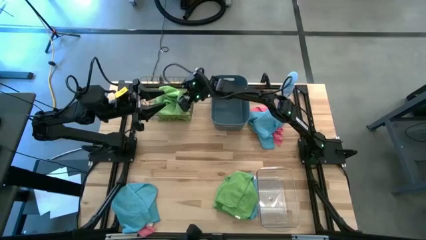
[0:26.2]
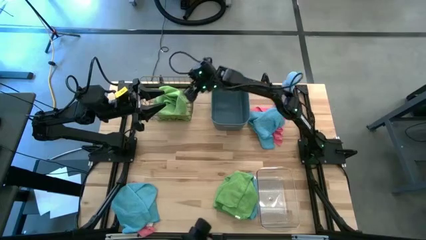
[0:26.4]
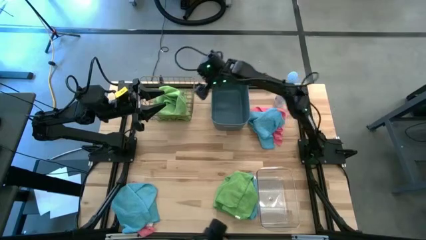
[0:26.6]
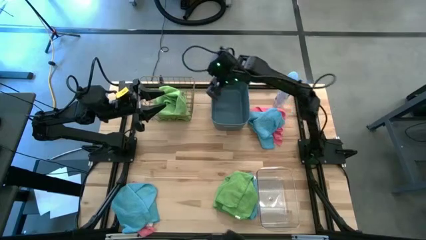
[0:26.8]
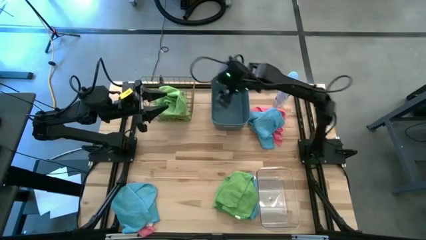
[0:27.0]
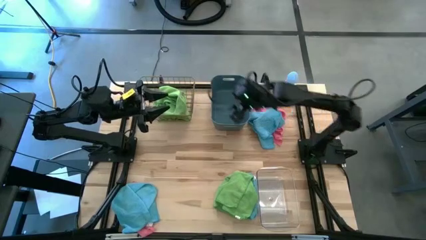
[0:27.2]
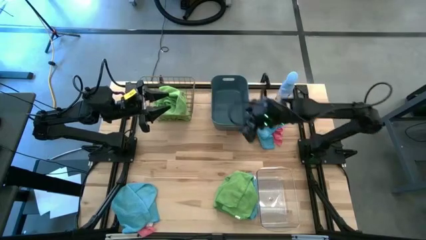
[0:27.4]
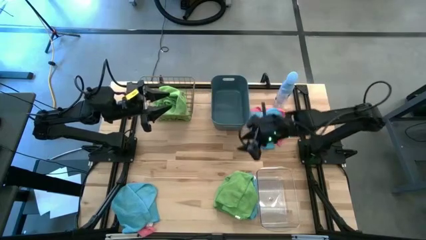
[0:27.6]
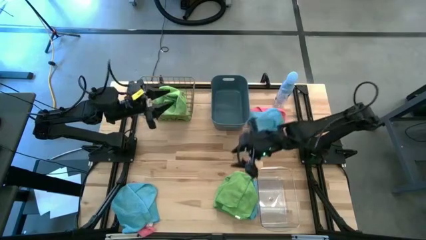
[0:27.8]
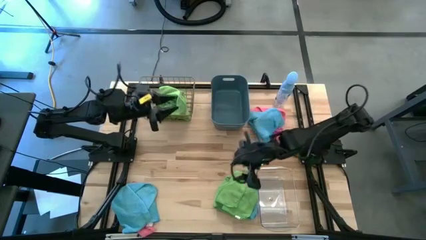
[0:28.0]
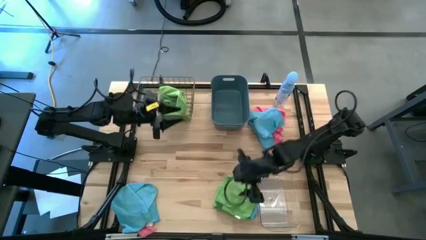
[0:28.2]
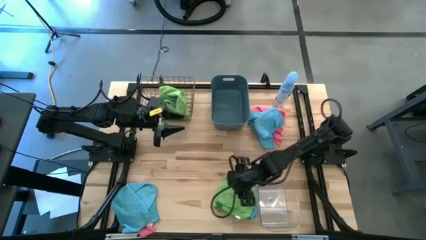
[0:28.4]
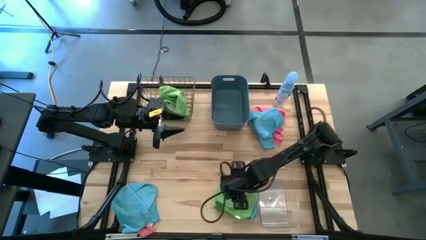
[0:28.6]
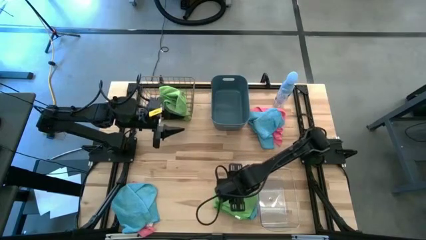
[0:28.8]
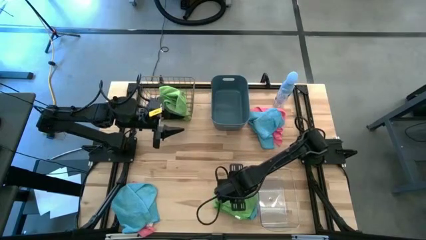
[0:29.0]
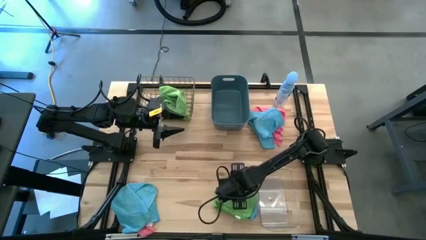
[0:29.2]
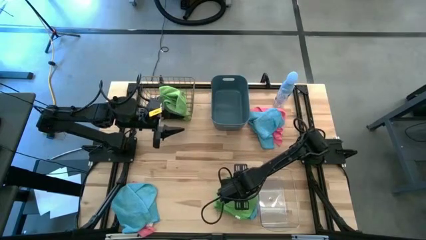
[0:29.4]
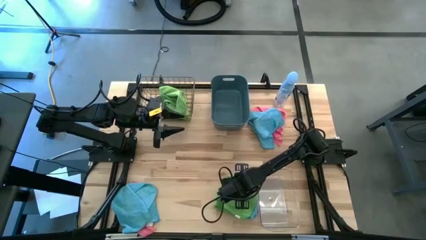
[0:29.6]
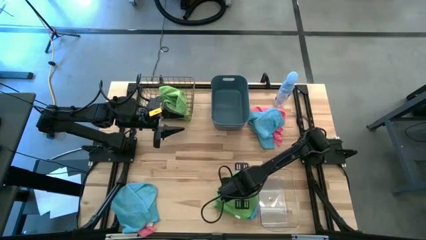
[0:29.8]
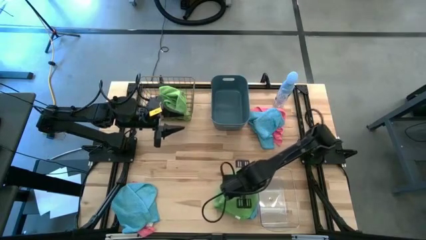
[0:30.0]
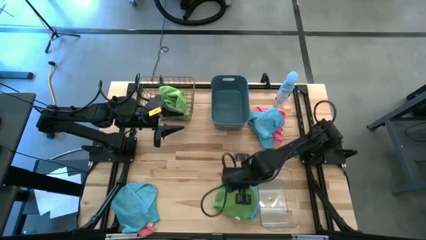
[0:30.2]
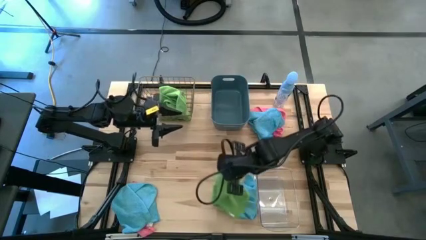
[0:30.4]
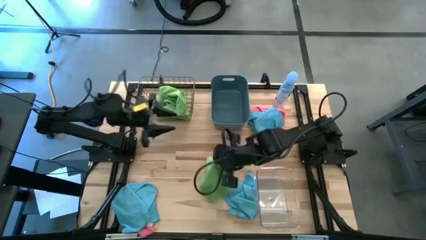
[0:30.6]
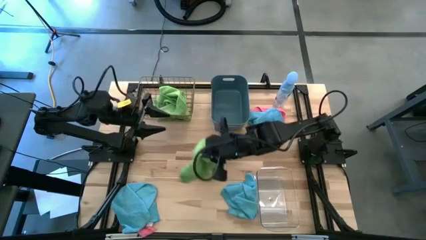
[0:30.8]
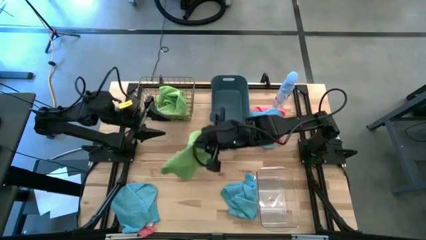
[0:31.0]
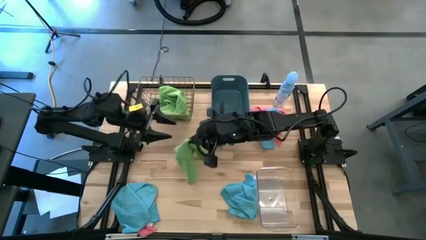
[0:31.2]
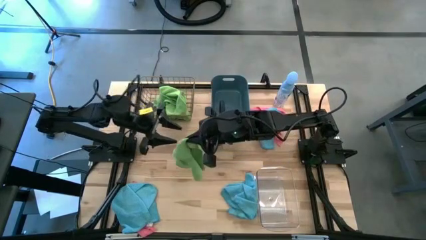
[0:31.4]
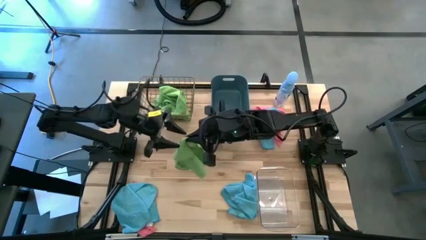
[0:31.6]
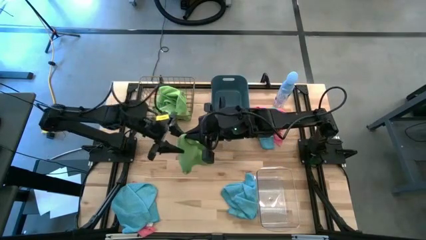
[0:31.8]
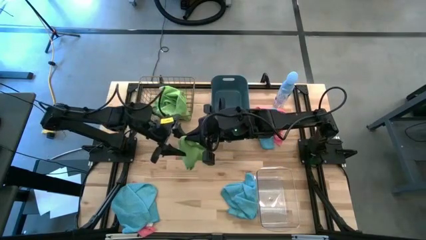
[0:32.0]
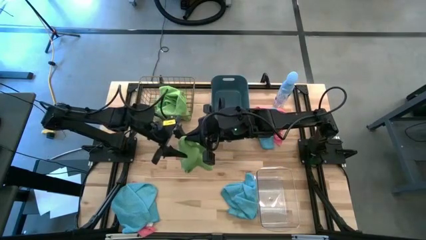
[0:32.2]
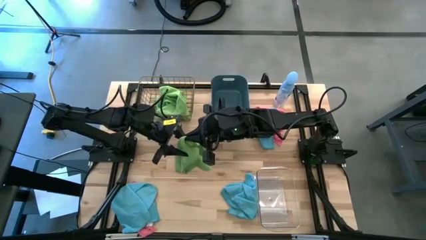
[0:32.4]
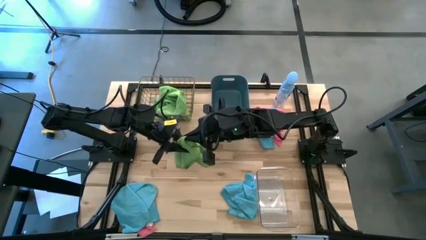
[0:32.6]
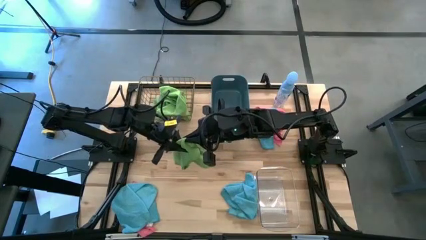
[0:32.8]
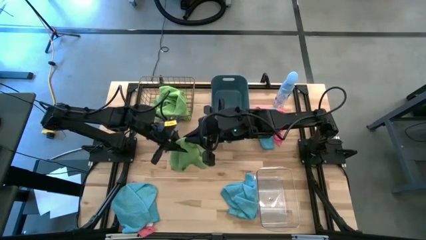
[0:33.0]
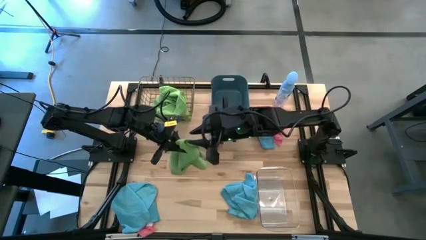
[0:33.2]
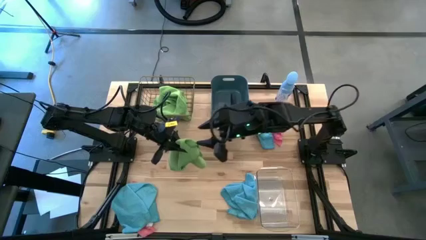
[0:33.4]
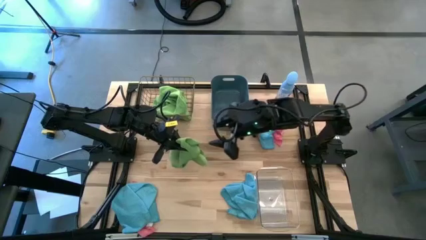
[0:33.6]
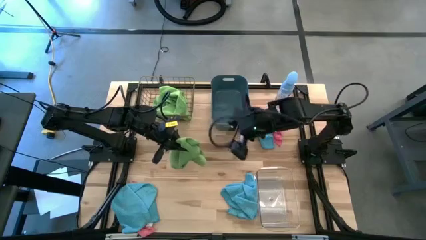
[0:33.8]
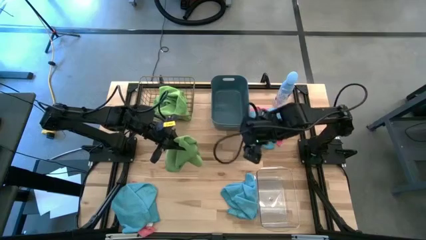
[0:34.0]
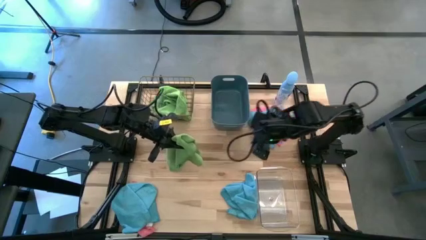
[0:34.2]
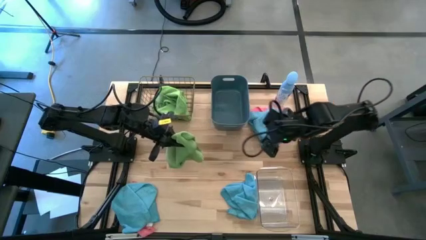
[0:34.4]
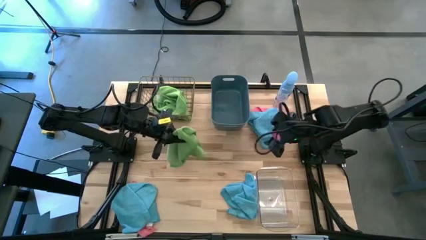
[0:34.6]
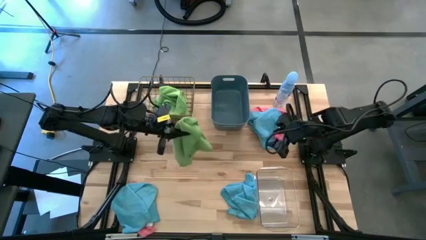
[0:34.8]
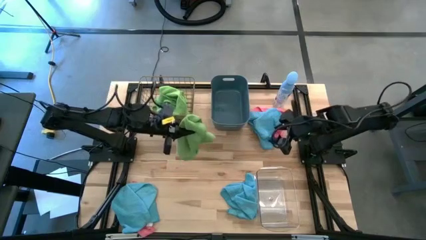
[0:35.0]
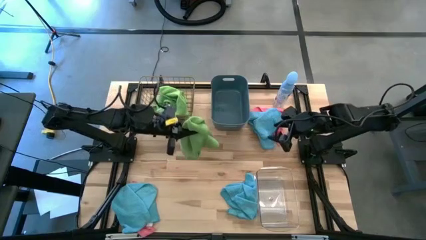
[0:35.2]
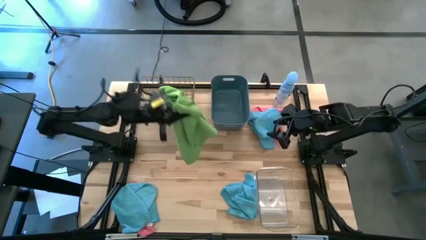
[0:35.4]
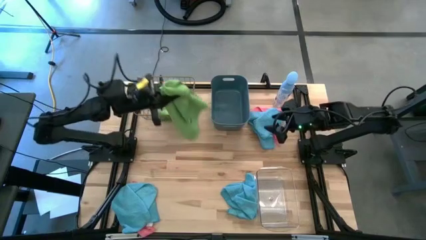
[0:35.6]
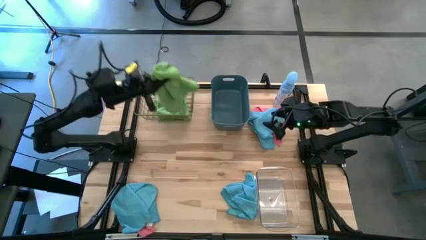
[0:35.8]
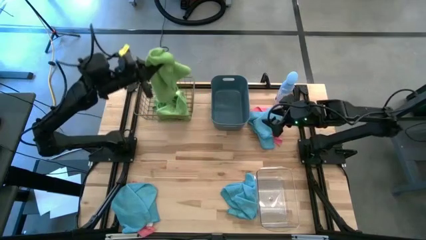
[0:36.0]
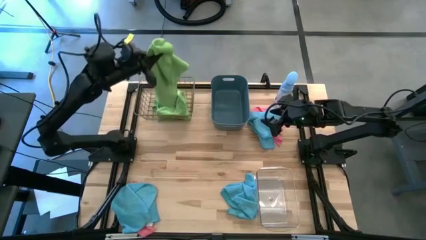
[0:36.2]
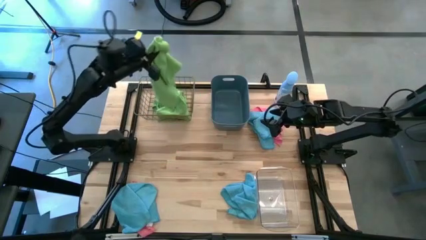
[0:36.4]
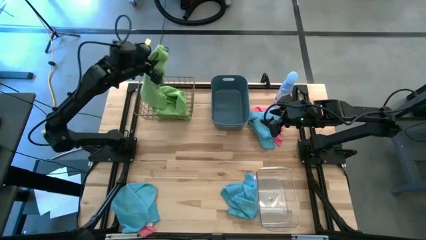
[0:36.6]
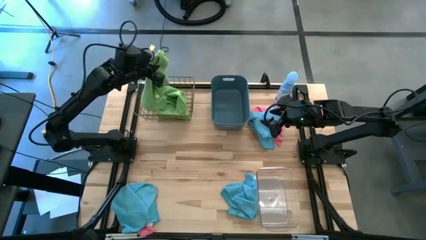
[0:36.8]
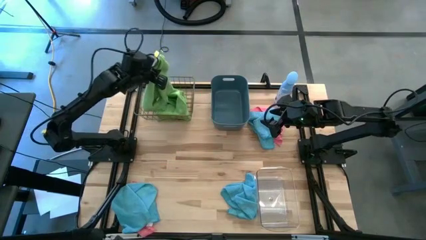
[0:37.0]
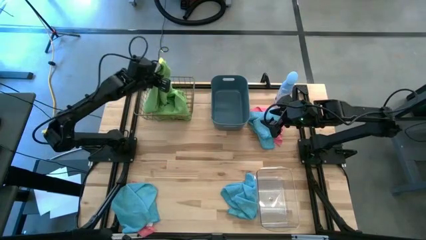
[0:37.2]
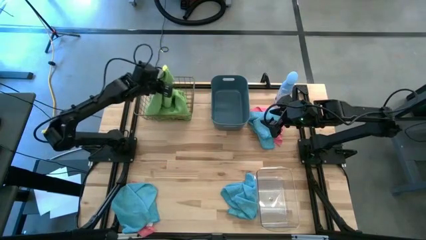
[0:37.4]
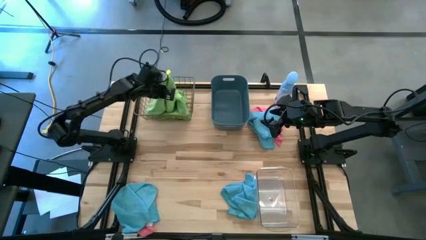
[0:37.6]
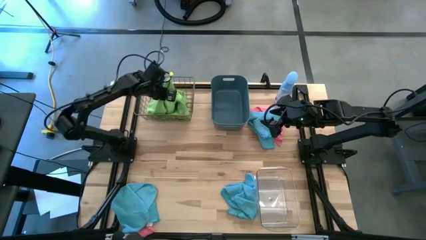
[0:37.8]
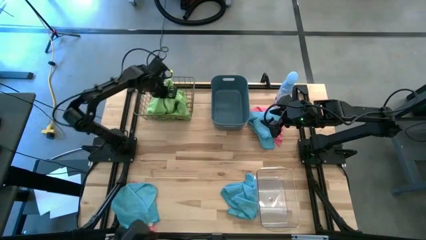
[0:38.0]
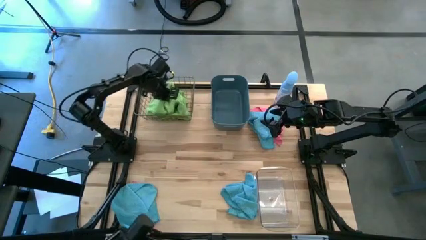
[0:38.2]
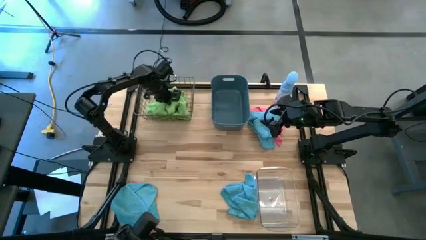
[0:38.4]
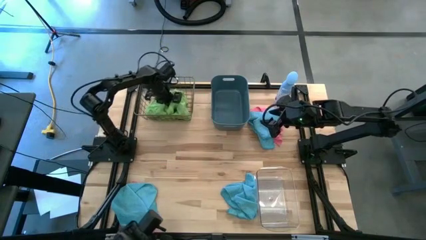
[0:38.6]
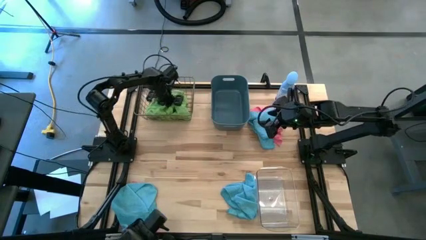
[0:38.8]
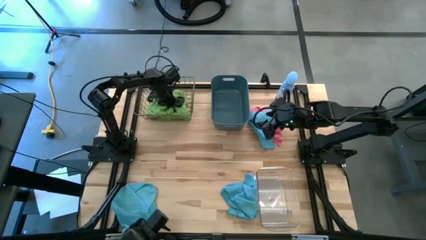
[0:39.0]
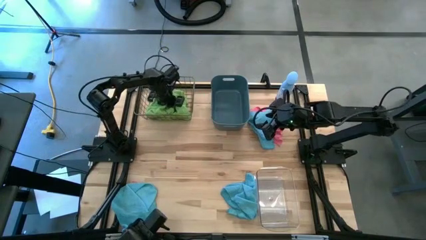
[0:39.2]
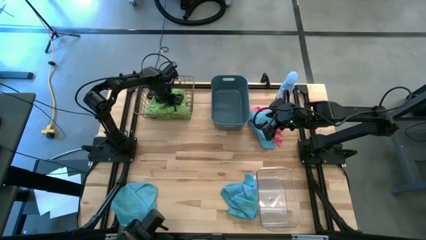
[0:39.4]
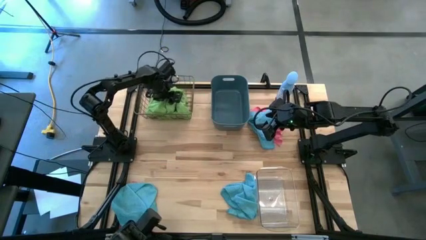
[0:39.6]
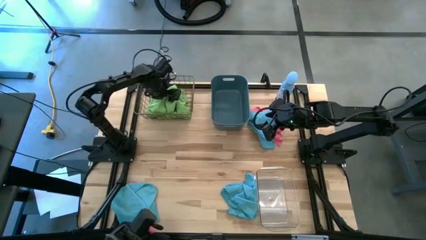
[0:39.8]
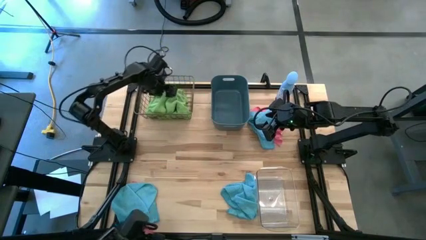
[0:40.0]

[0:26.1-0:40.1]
Task: Sort microfiber towel by color & place in baskets
Put the green towel into the wire basket

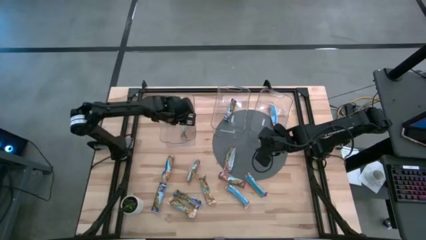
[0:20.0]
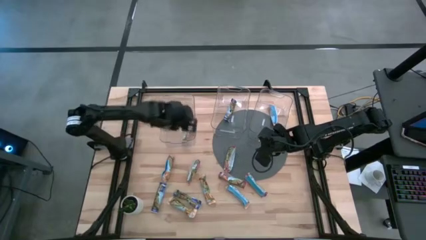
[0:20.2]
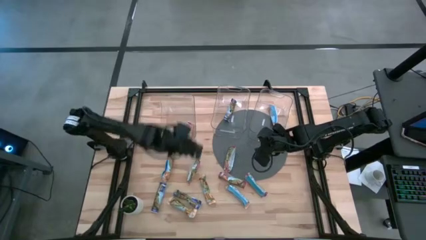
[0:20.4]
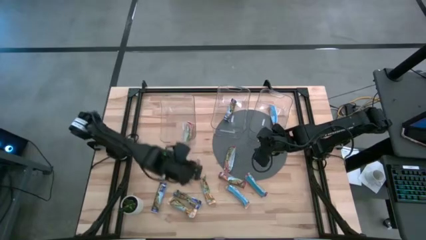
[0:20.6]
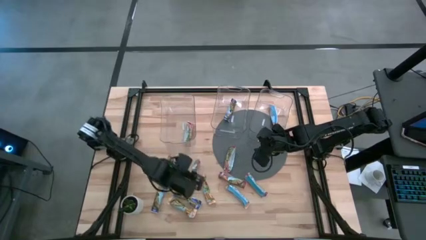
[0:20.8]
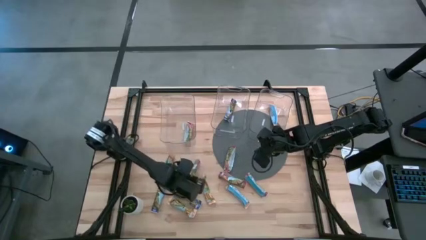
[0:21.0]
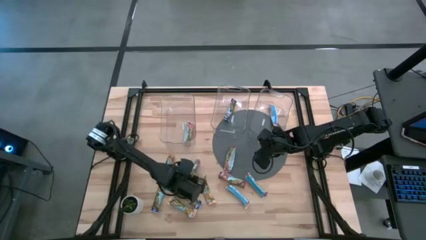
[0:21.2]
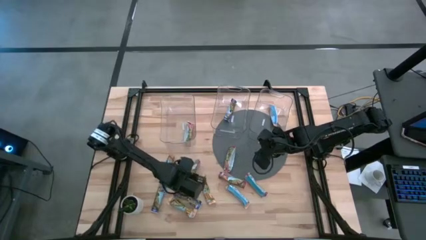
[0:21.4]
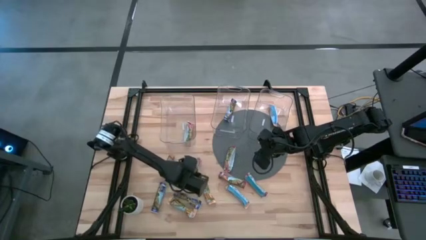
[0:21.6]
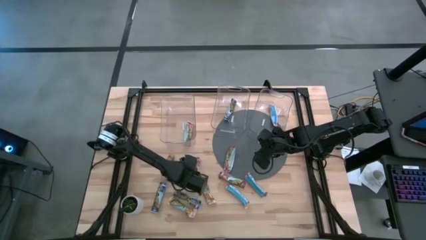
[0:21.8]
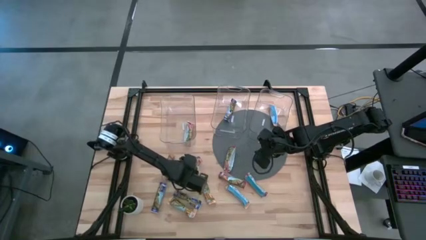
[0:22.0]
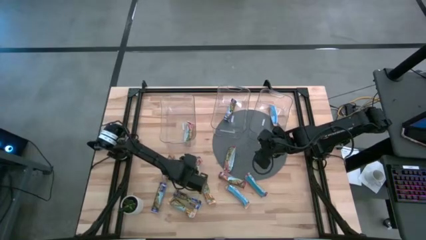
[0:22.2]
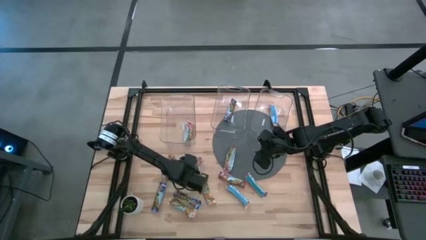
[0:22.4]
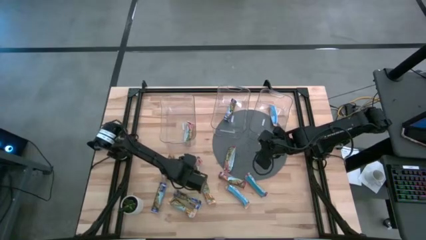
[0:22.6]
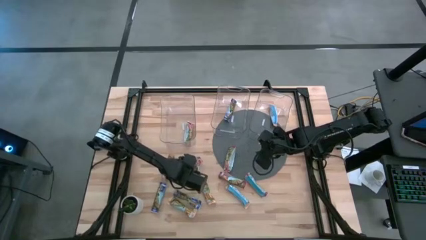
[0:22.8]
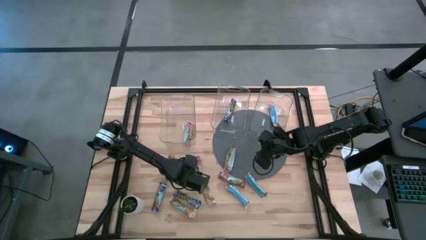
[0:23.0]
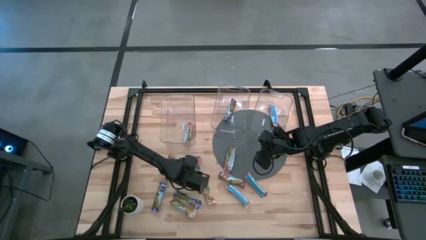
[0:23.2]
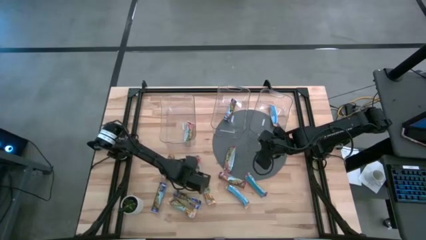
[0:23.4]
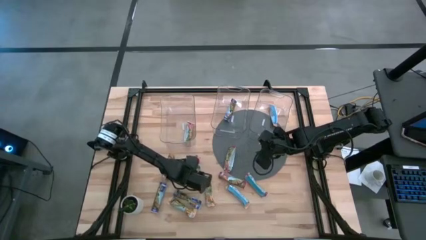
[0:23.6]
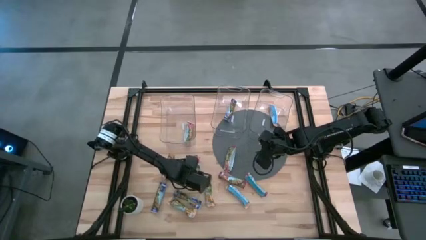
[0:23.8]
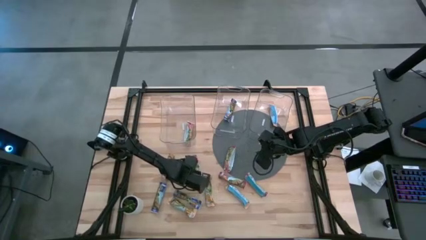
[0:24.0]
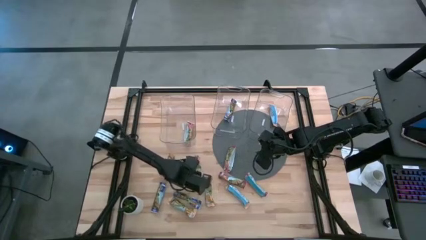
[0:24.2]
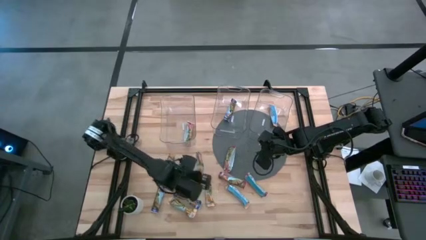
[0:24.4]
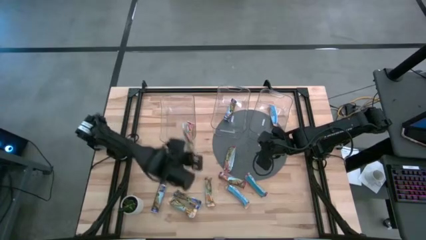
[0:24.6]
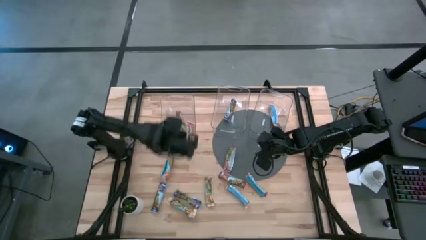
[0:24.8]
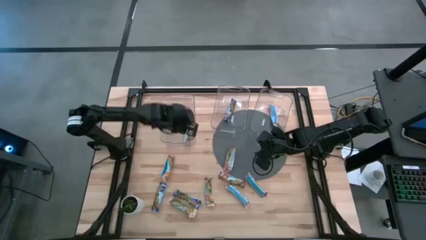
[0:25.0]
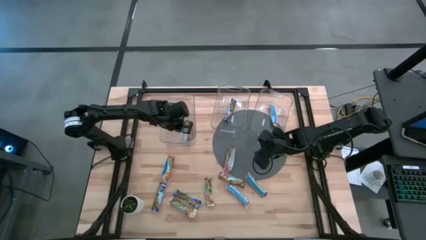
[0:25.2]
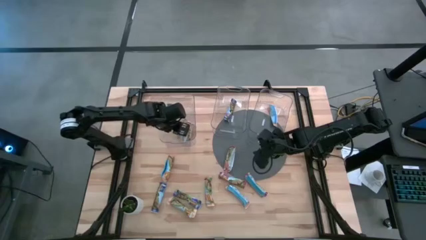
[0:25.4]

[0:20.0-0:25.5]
Task: Pick and place Granola Bars by type
Put the red granola bar into the left transparent bin
